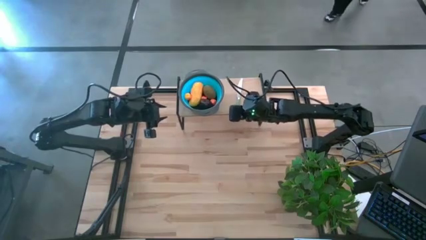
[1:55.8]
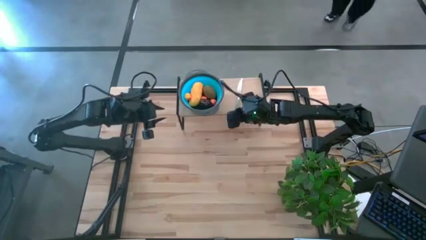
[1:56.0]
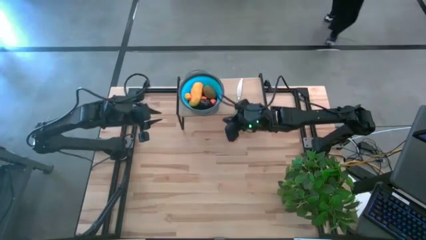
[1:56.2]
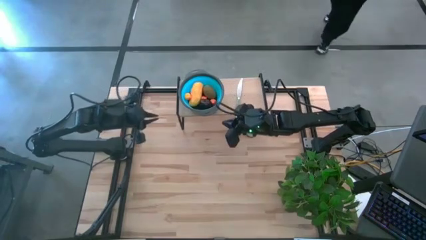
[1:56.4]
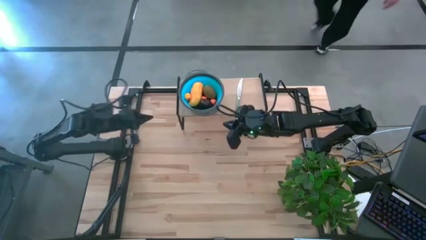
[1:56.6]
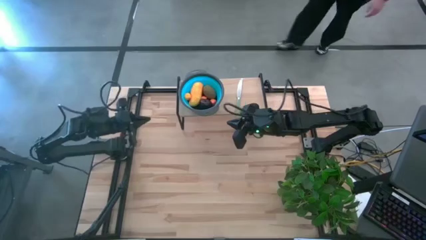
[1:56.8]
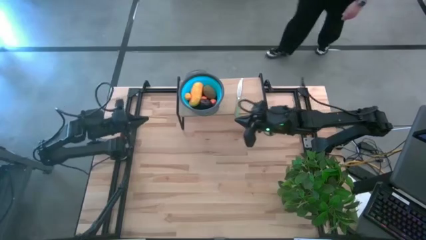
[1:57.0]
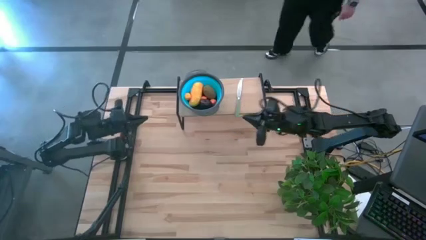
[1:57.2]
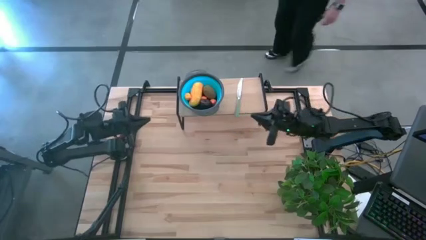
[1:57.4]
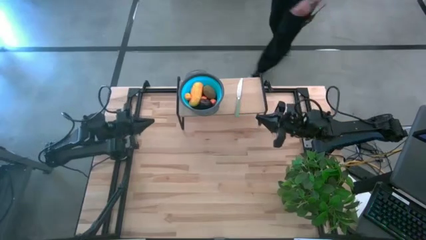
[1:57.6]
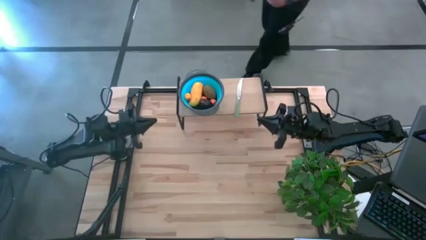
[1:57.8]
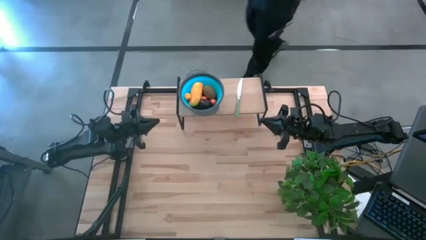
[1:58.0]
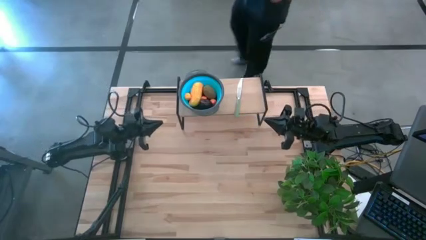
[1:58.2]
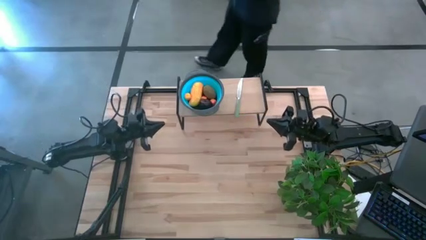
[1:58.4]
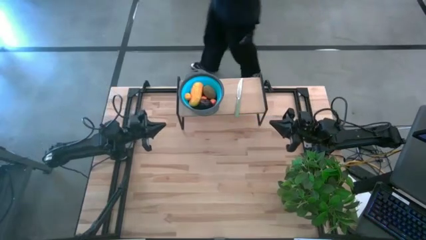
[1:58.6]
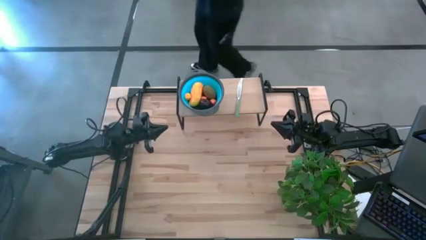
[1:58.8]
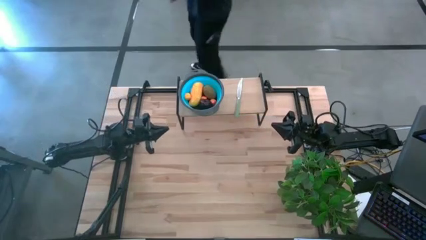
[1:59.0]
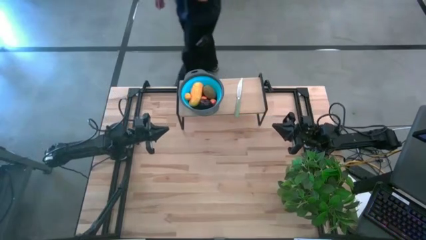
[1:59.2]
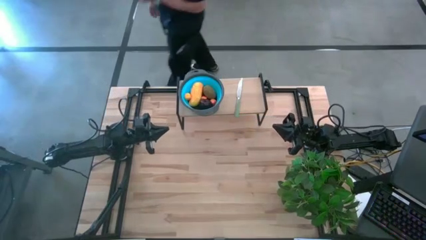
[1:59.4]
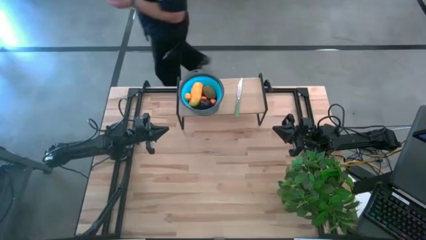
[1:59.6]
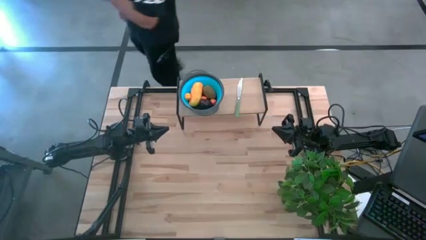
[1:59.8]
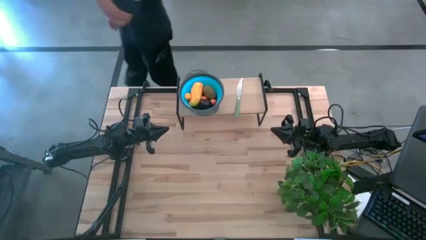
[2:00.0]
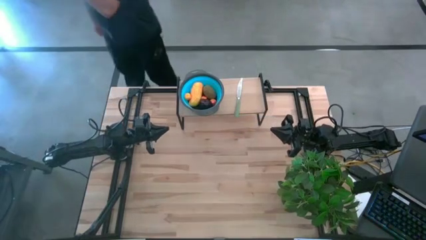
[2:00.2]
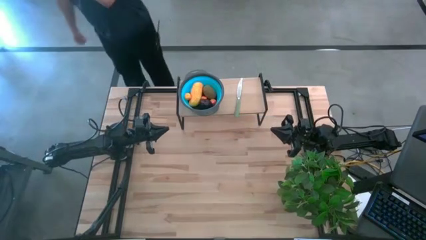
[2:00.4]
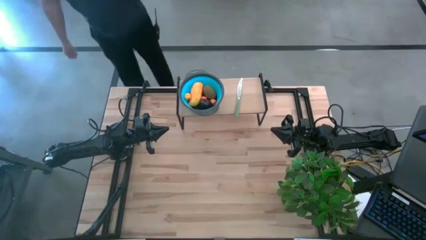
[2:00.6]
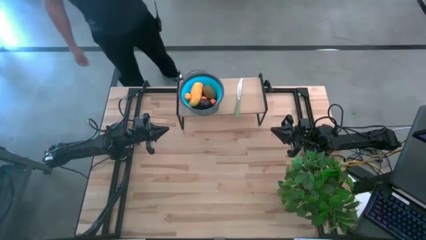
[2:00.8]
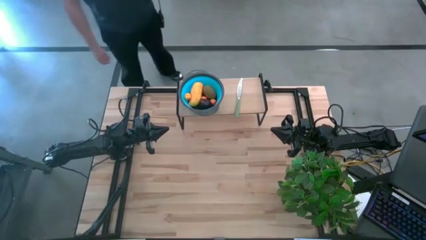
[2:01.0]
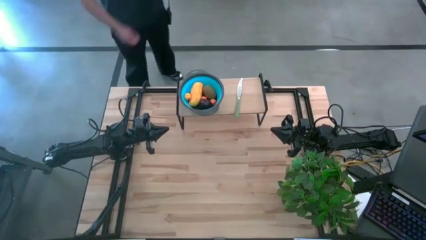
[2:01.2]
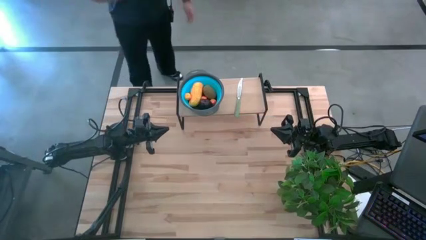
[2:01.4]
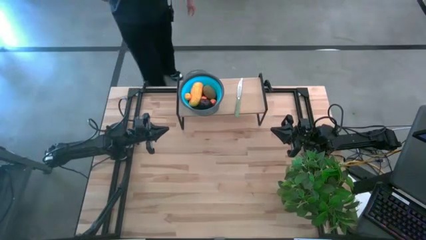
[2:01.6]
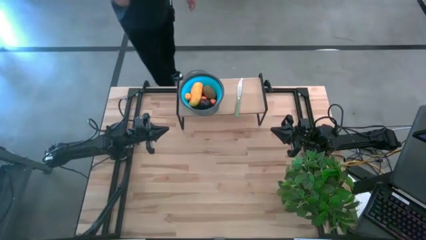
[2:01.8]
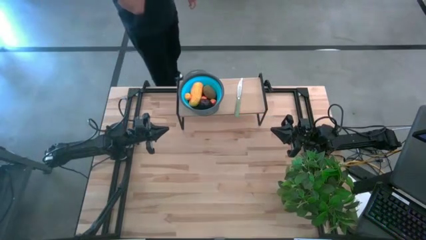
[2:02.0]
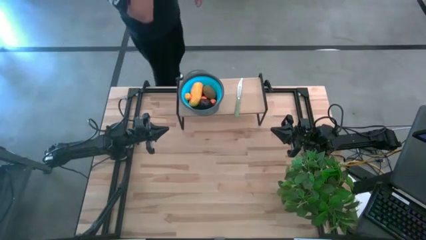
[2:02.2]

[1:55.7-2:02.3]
Task: Pick & Place Fruit
Return to Home Position

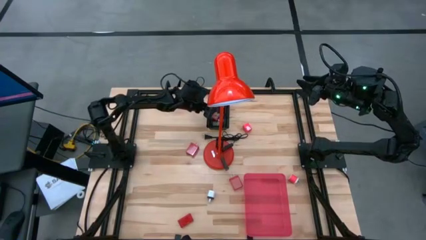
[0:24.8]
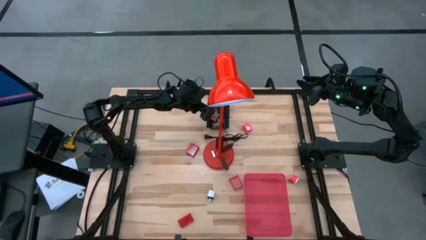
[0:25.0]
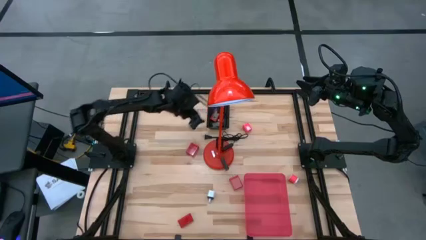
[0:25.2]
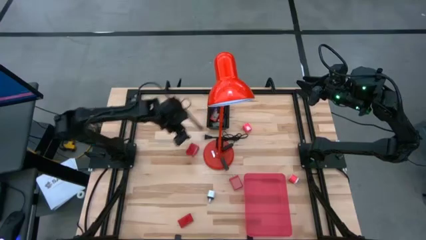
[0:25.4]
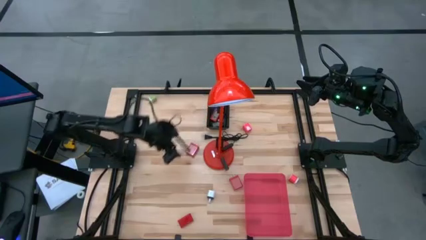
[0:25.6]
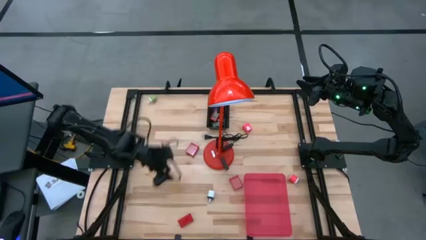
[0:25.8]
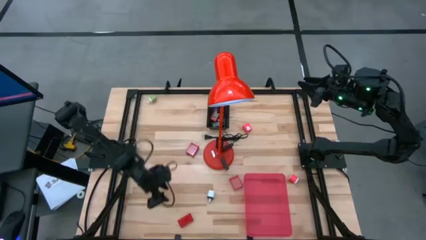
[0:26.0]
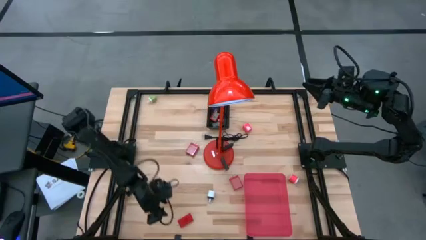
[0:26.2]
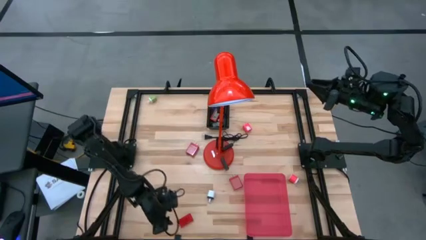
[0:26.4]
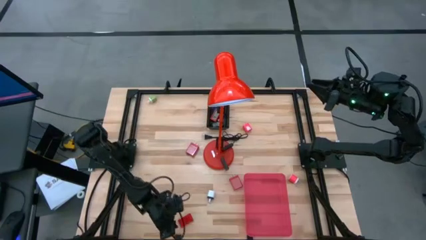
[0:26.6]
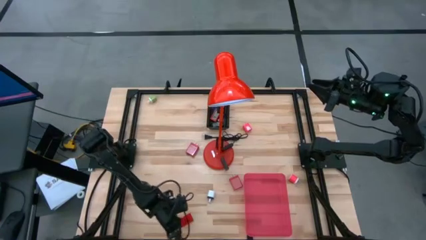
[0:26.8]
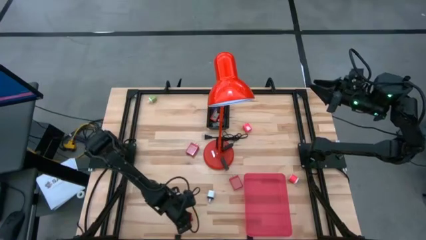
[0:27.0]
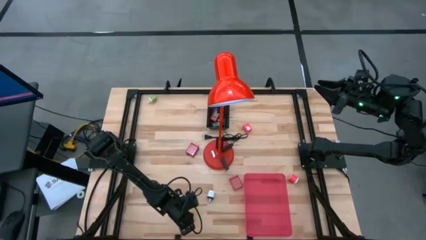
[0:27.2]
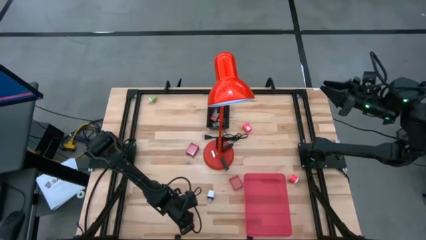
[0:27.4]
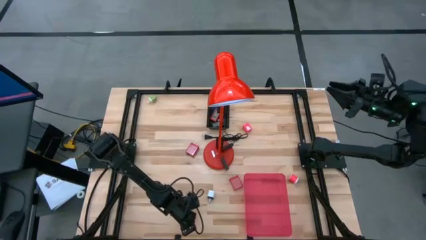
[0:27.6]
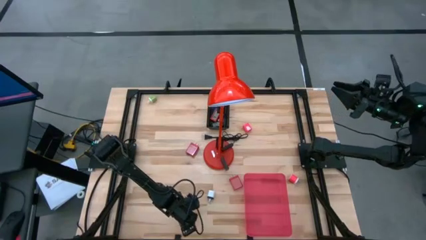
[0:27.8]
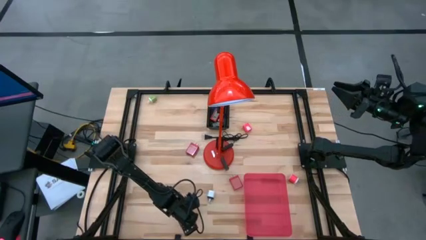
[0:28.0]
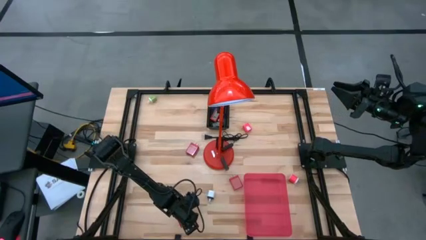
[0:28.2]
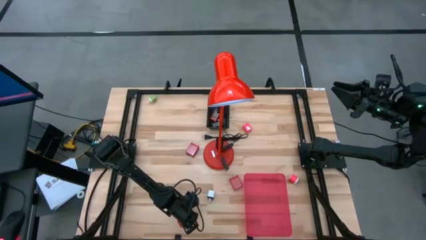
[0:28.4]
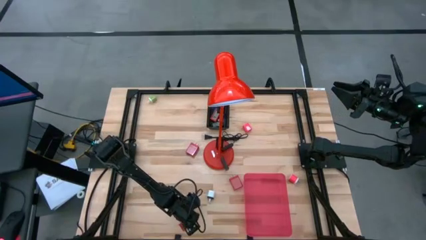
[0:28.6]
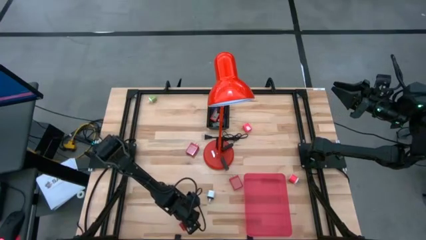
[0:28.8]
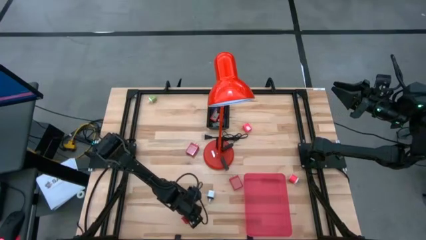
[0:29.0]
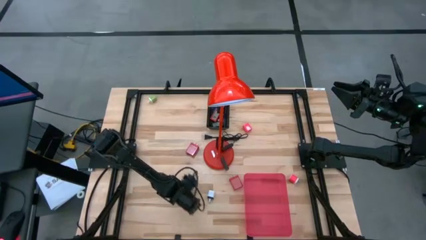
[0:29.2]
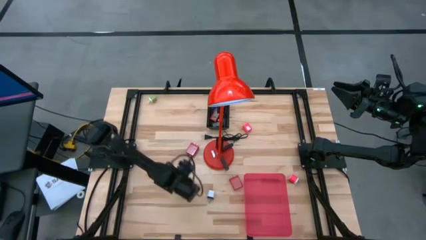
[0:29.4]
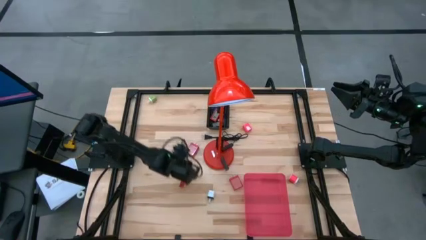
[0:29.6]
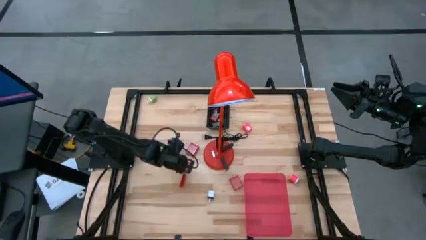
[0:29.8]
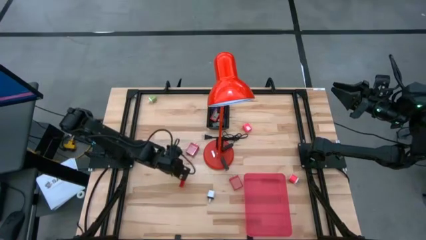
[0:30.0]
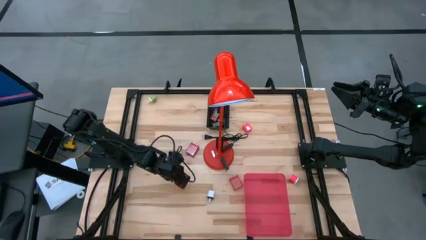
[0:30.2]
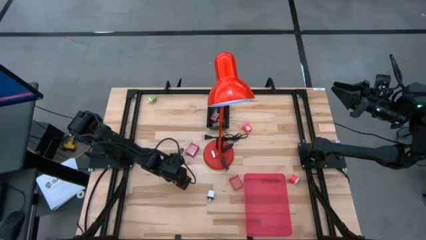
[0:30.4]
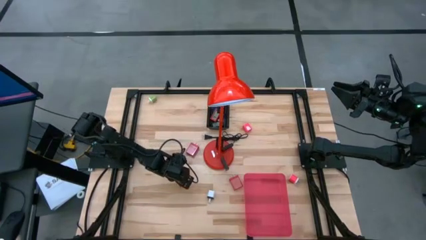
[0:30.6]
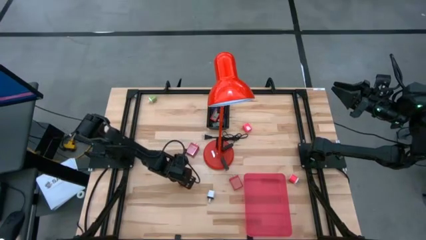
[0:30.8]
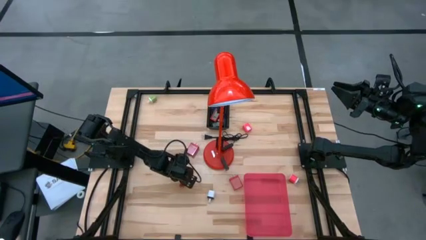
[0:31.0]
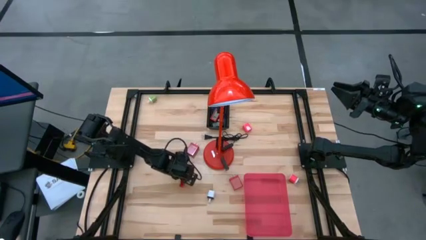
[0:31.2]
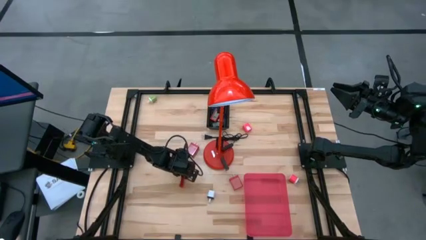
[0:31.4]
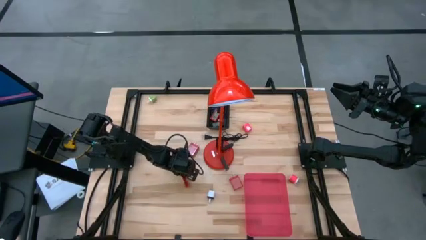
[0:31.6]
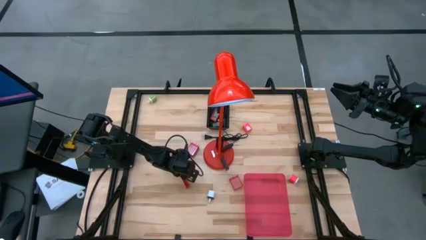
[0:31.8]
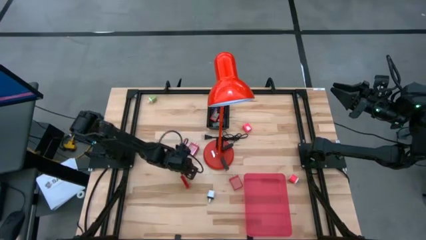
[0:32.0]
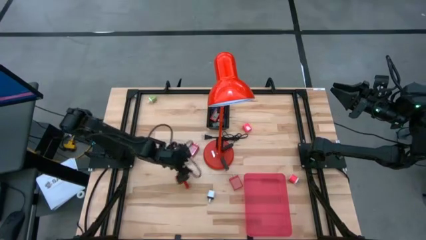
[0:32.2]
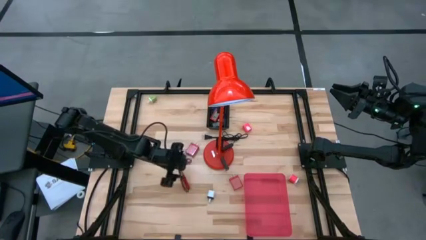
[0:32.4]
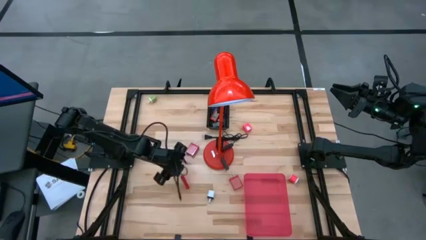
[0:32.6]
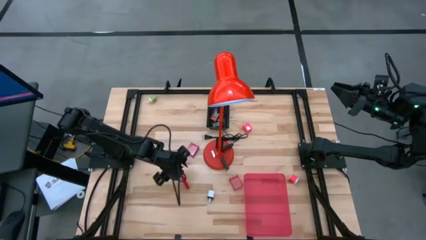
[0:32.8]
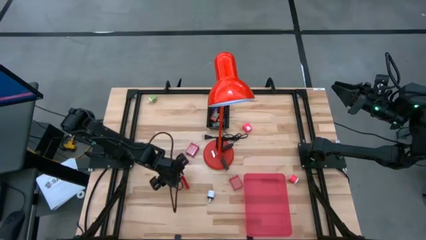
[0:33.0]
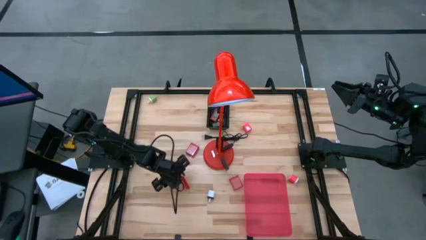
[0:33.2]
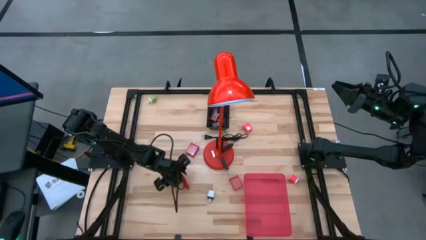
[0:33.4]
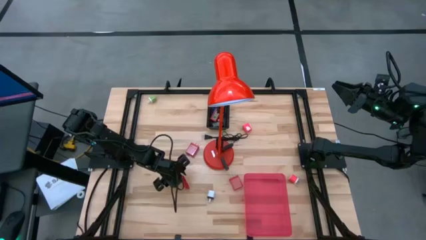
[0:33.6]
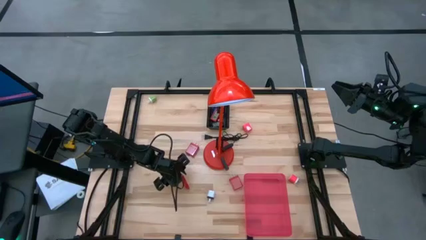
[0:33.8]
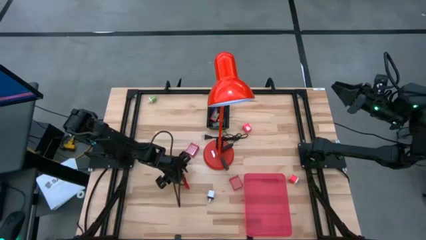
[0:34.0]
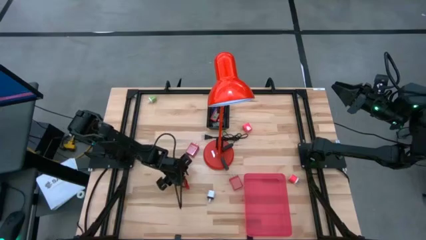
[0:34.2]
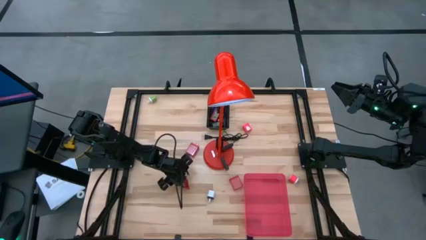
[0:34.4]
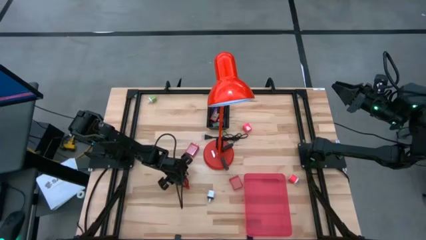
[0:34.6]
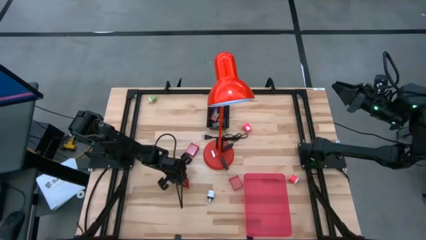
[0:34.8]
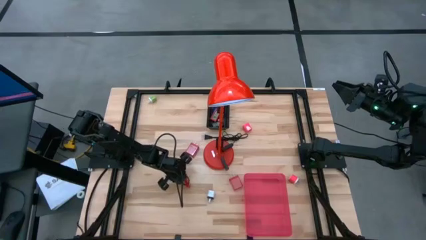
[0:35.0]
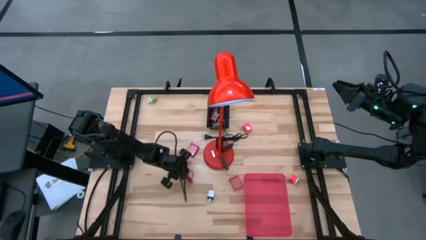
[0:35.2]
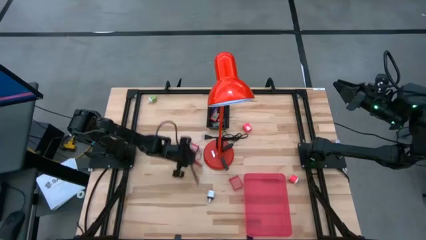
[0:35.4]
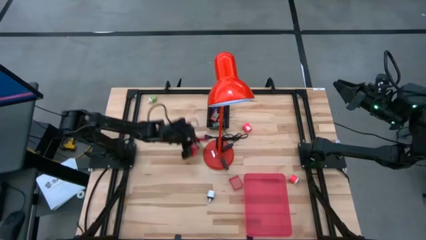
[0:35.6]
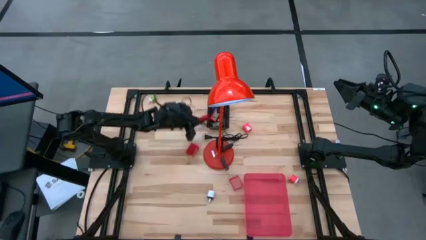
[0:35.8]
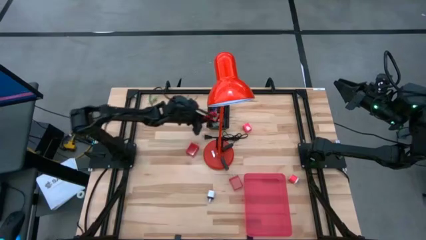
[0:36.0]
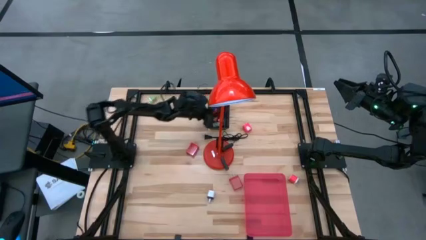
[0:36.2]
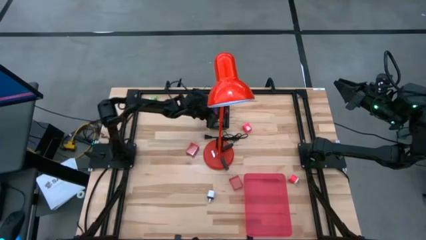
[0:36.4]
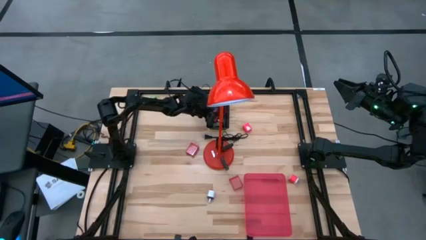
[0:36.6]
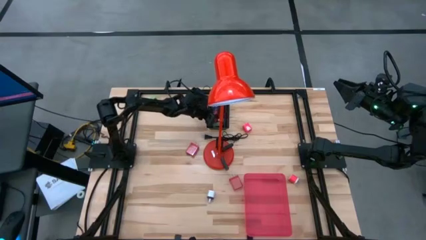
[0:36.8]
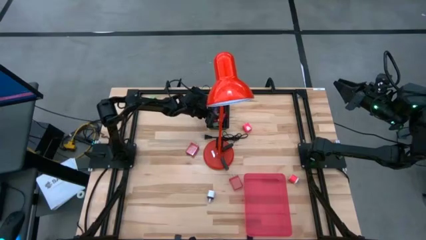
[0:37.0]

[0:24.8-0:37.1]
Task: Pick & Place Office items
Put the red digital timer into the black bin
